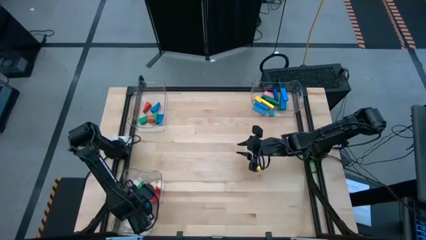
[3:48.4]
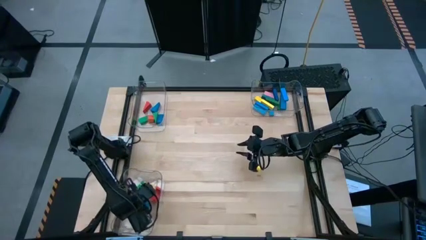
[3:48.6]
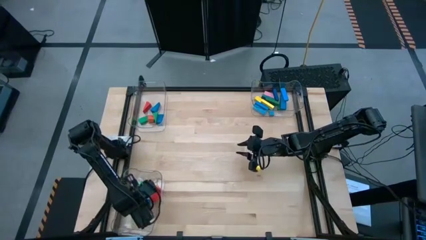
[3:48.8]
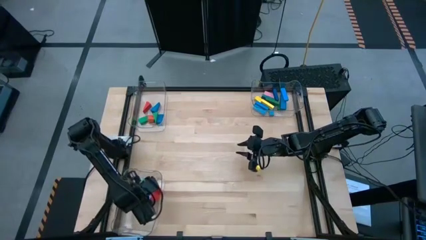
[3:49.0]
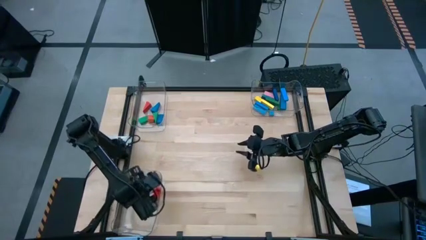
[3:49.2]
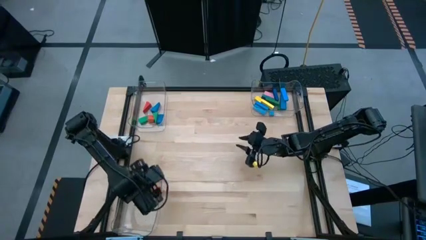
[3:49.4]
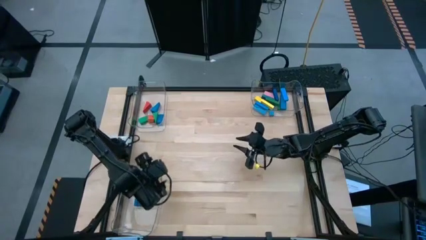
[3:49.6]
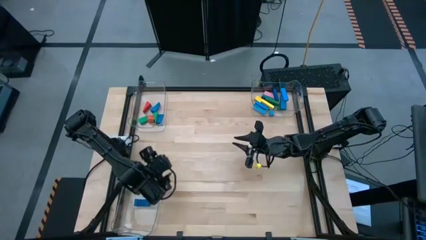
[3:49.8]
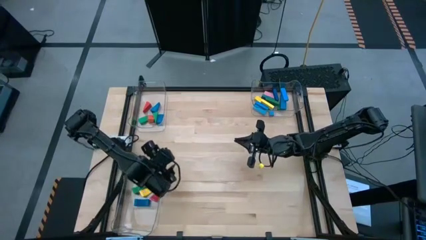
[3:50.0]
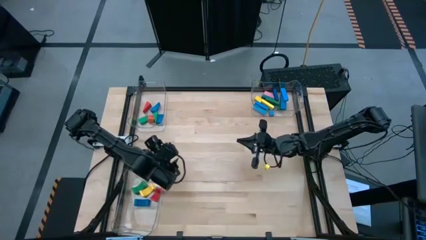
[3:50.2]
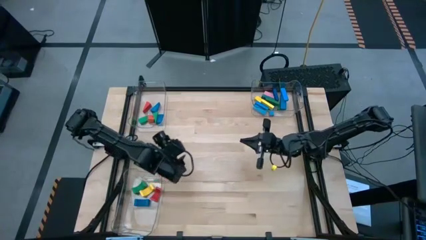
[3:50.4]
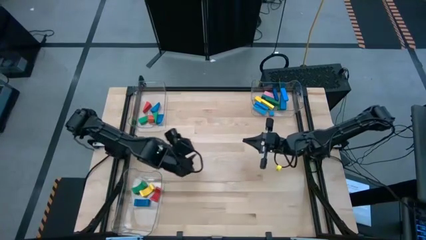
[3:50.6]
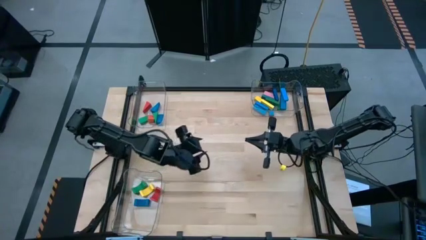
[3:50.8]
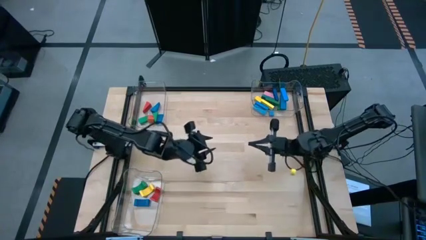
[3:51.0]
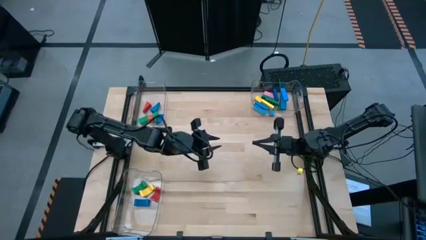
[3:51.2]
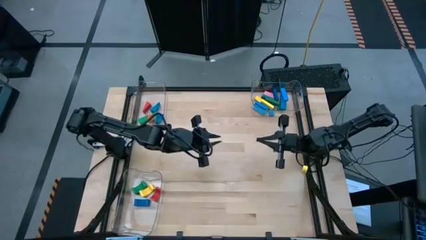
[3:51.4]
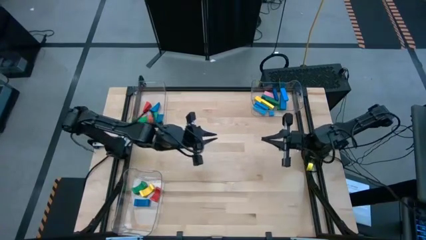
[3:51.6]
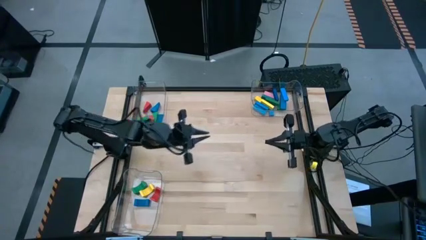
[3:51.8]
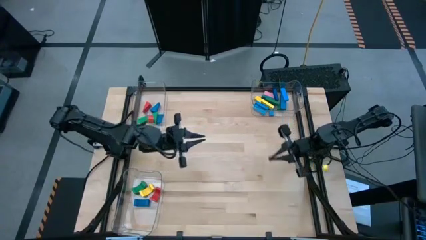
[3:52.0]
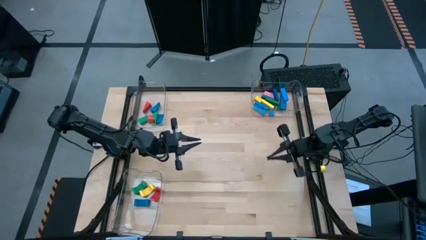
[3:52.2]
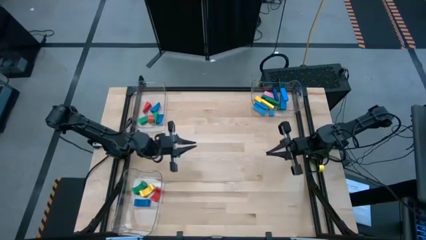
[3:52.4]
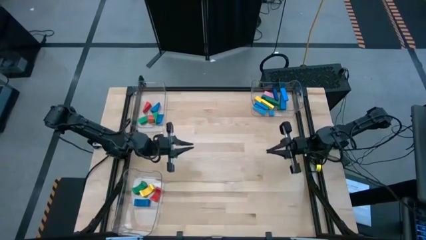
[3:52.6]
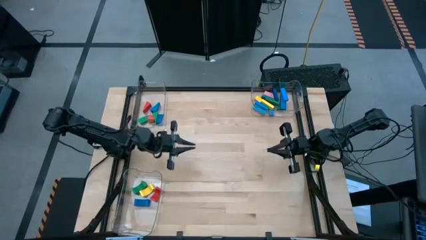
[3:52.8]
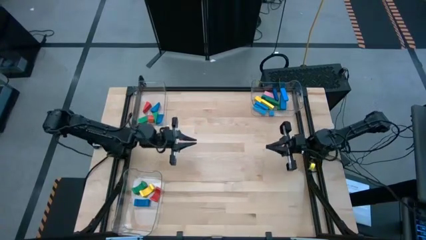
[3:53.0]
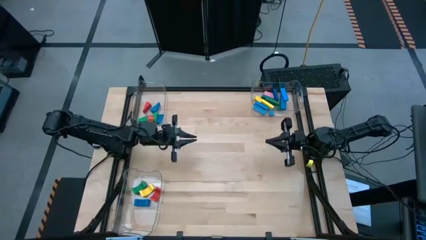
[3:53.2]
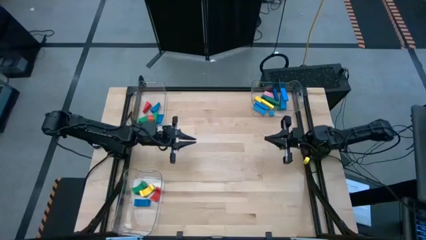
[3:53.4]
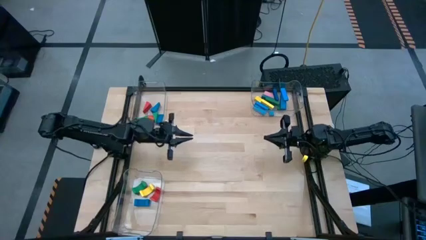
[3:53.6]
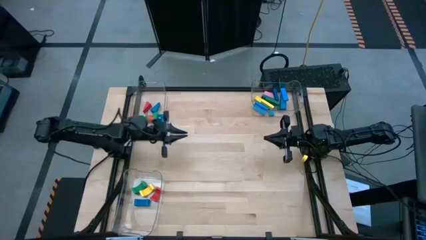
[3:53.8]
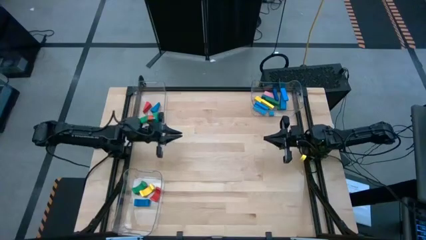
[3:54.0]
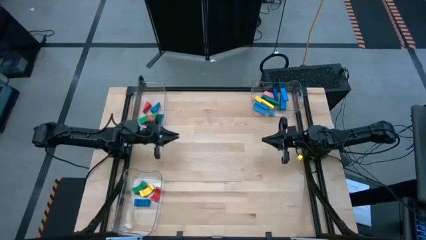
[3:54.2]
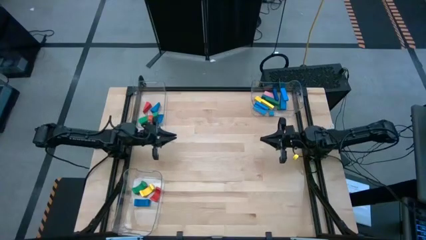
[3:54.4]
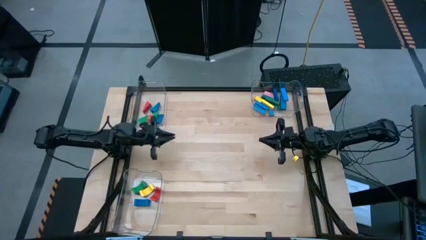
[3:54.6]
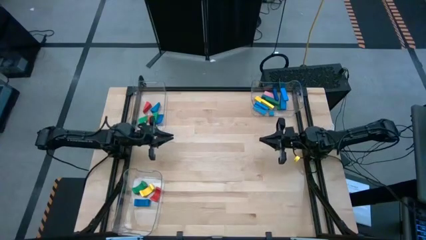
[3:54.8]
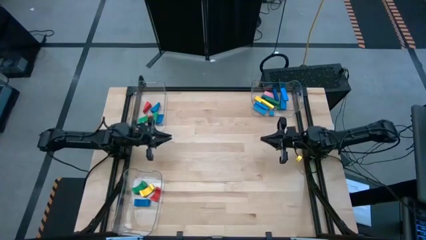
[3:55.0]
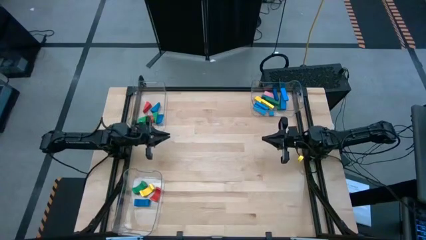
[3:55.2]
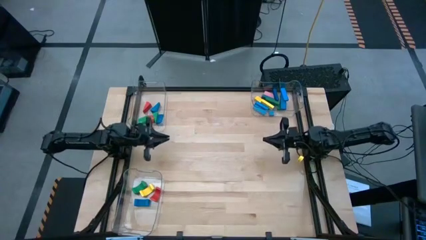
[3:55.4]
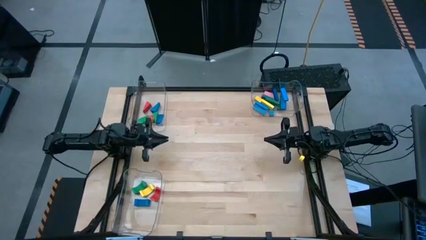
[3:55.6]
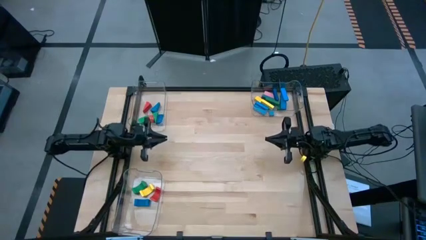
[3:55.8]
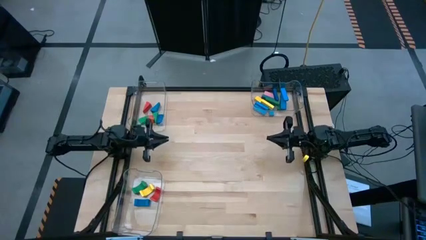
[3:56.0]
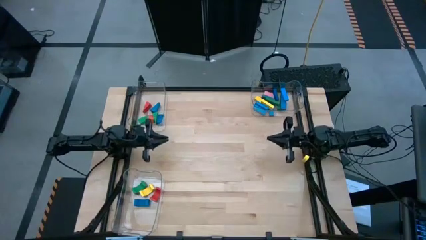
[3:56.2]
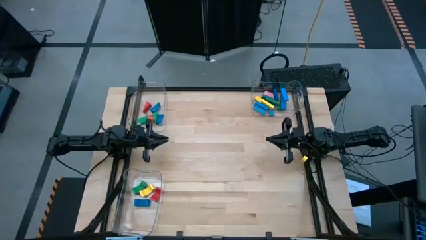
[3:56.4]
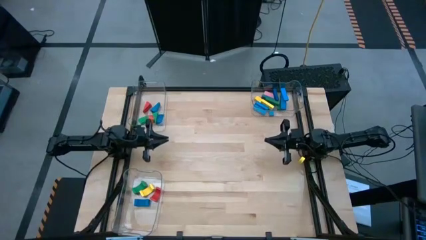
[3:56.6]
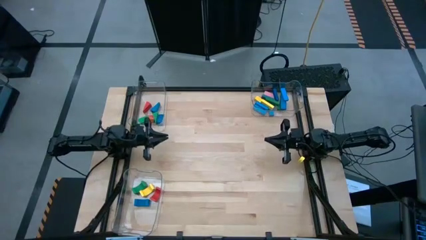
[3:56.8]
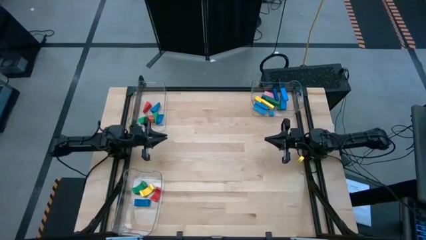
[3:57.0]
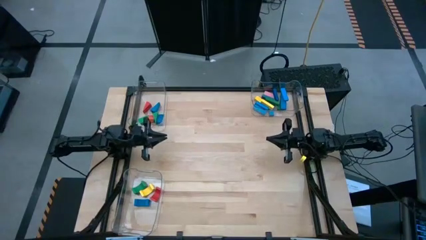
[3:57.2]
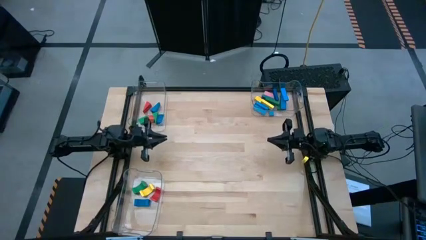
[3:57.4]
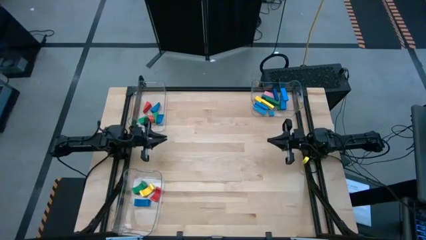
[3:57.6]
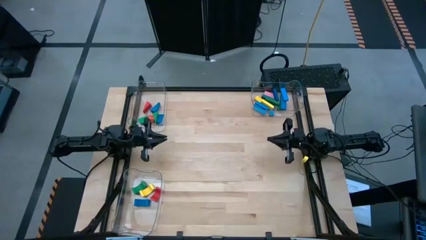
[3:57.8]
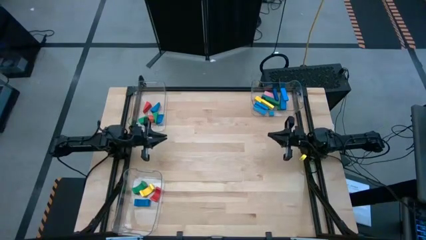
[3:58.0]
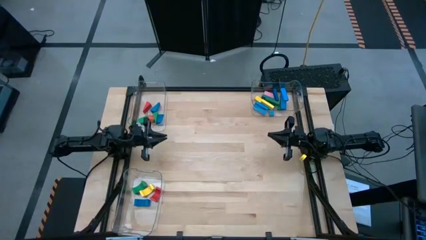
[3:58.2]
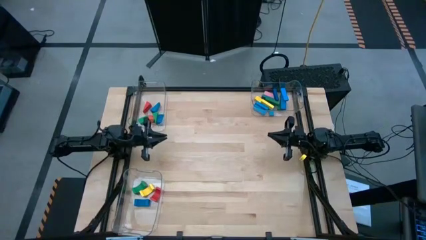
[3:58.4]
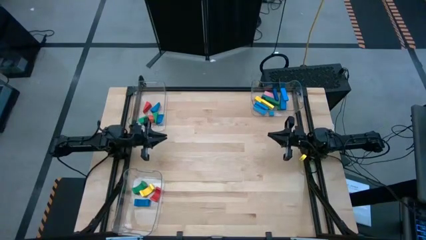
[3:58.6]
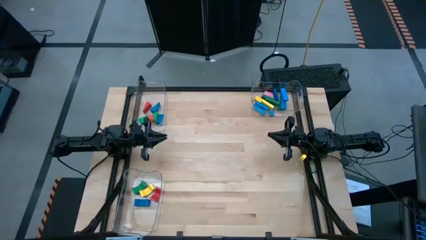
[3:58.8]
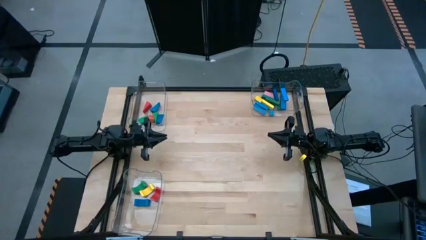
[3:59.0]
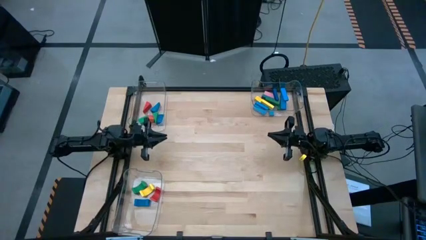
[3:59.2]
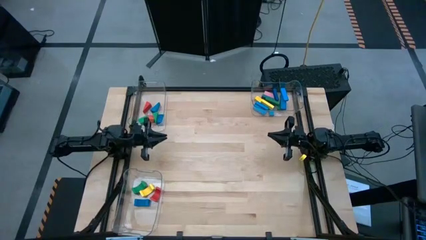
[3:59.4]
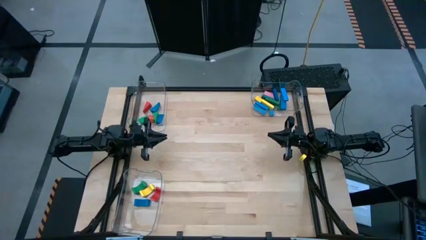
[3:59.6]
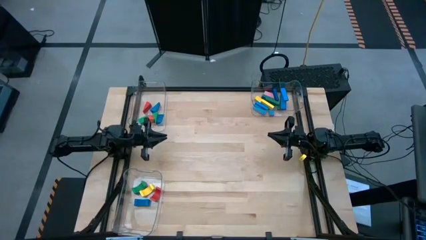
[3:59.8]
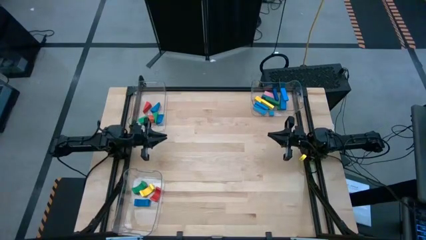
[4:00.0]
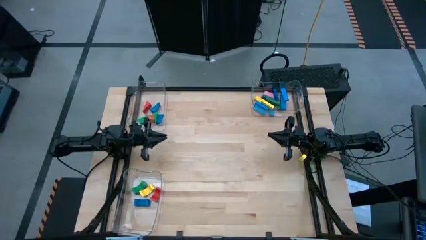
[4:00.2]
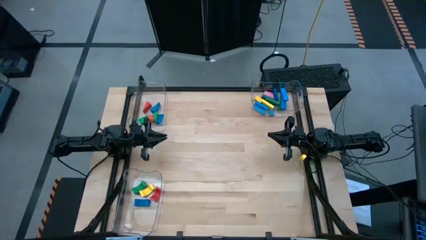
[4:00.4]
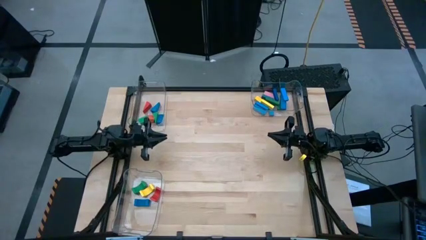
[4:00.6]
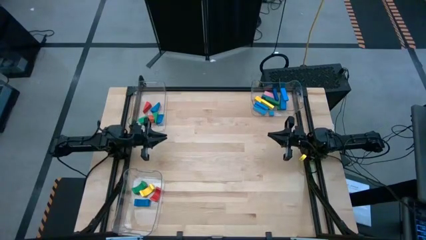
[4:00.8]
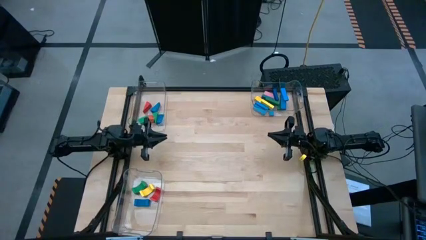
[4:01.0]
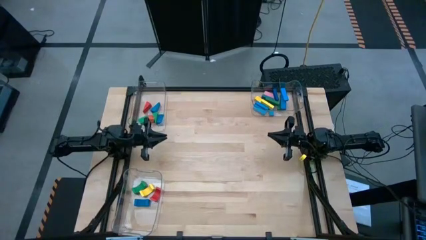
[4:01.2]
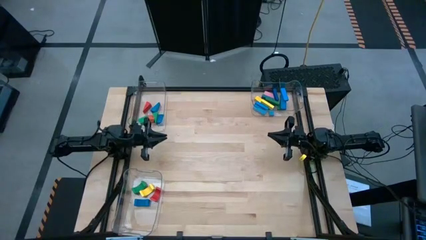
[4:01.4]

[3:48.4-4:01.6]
Task: Sort blocks by size
Return to Home Position

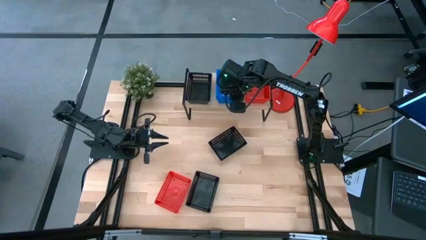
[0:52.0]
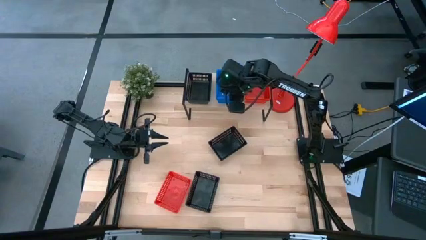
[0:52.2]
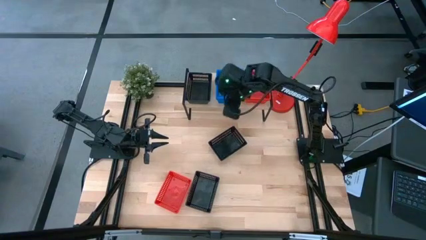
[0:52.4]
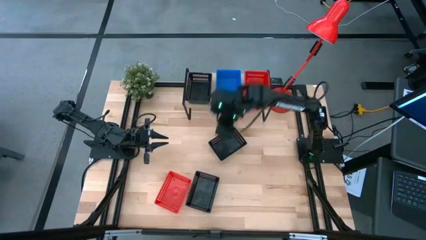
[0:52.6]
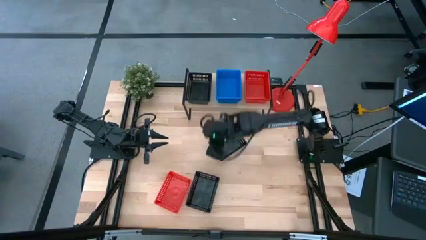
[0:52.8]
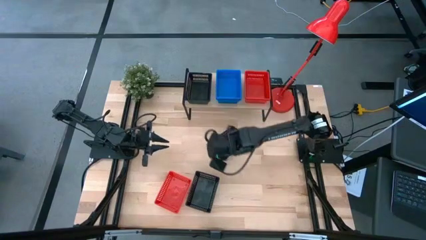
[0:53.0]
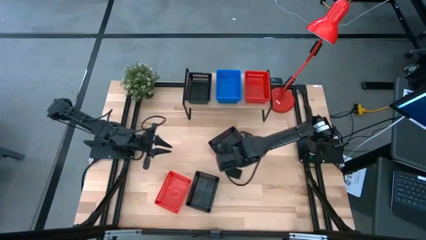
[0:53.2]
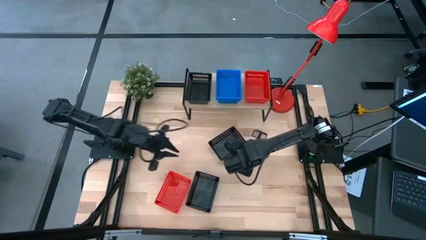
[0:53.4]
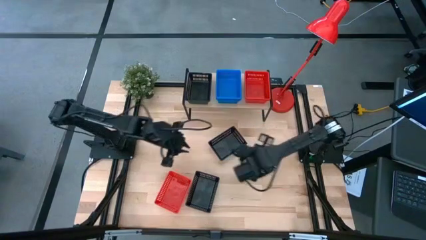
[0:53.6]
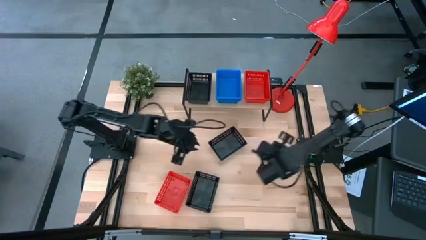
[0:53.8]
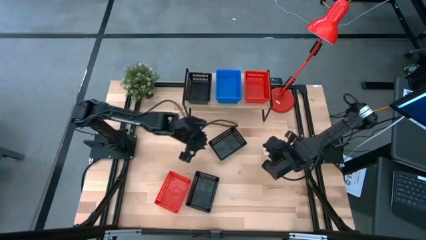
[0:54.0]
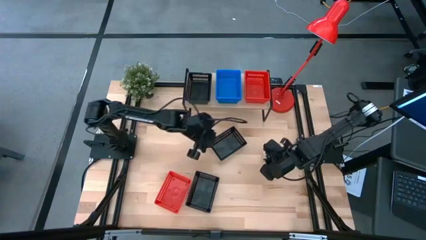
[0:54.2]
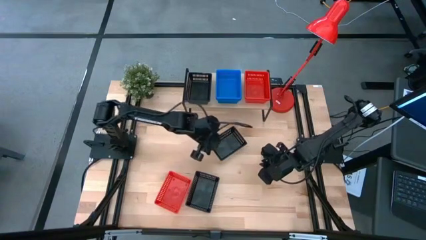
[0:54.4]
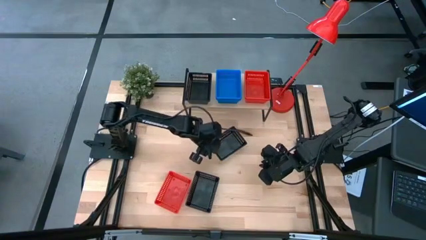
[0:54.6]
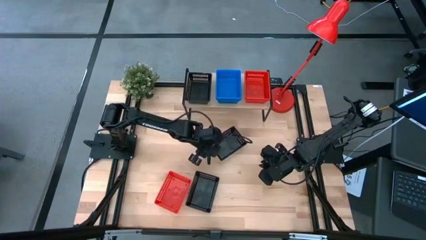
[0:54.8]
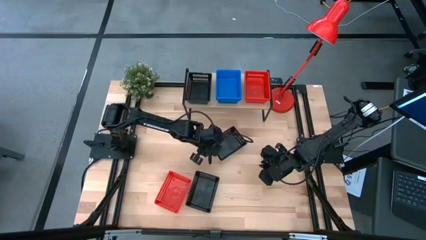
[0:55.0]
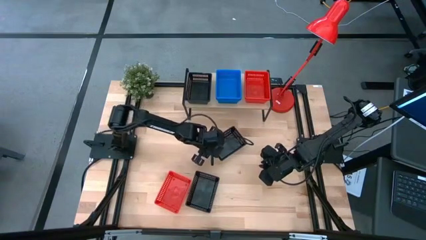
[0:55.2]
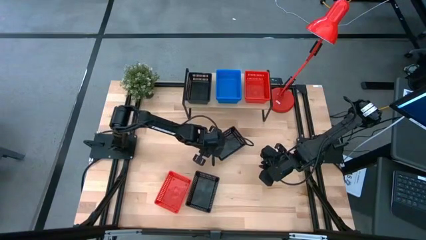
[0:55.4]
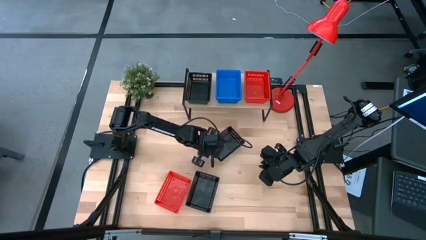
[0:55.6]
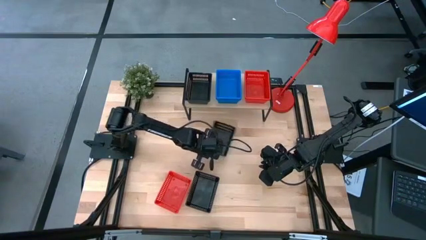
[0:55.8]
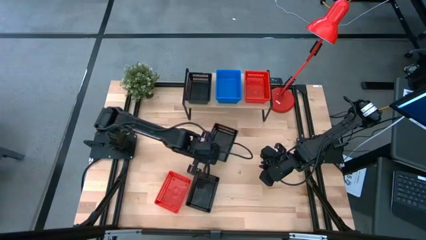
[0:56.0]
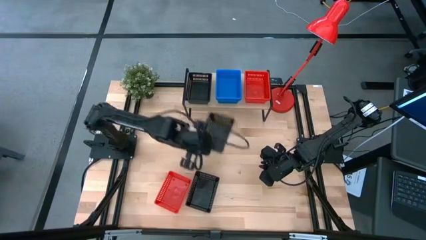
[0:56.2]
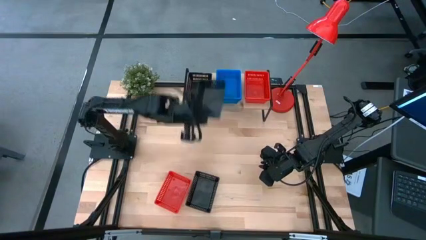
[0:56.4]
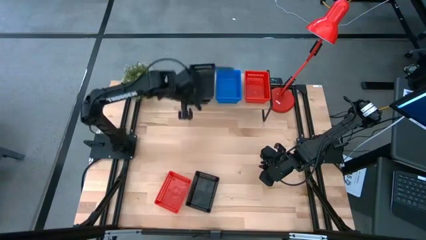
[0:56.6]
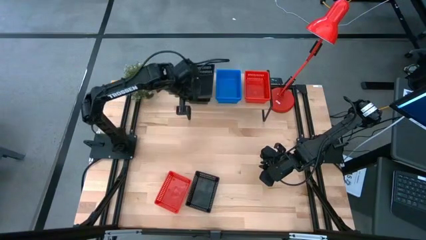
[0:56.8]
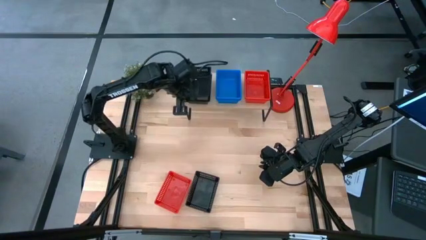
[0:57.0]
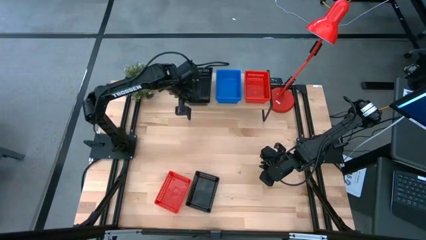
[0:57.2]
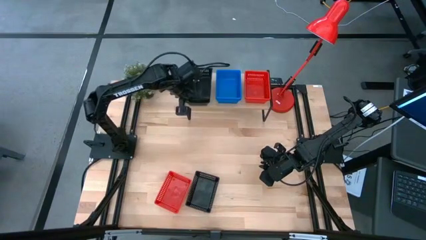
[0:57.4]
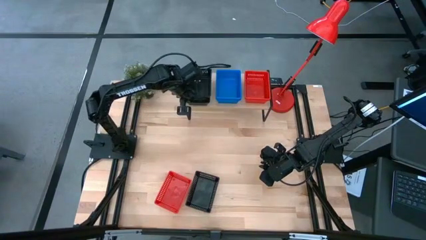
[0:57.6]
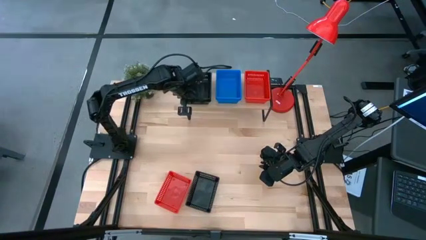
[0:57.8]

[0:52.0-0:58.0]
Task: Stack baskets on shelf by color
Stack the top black basket on top of the black basket on the shelf
